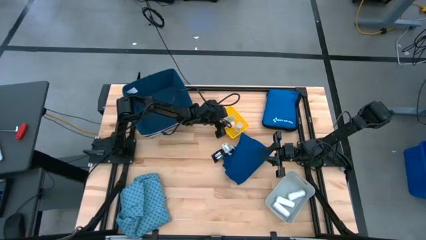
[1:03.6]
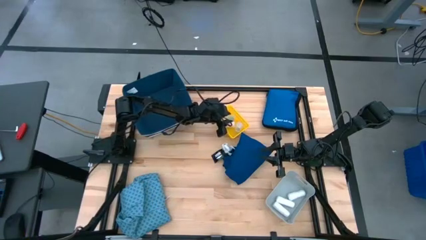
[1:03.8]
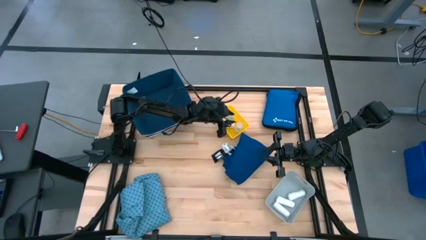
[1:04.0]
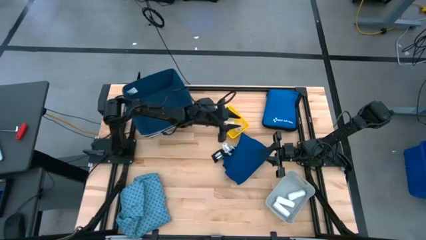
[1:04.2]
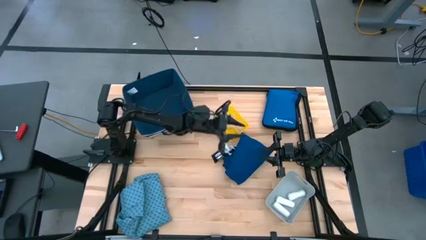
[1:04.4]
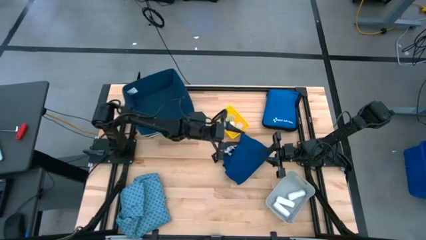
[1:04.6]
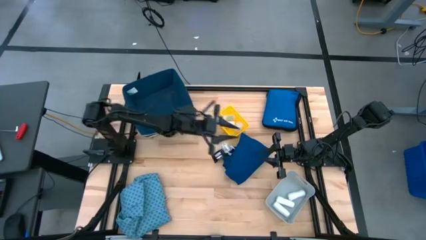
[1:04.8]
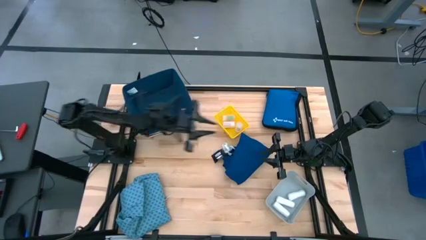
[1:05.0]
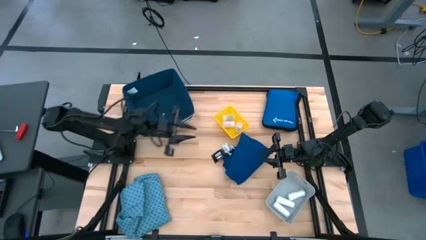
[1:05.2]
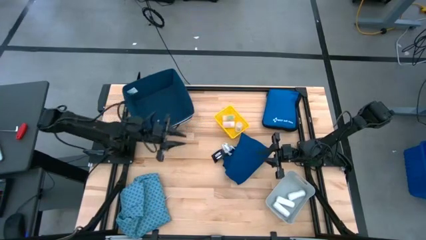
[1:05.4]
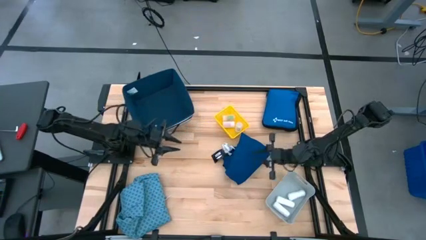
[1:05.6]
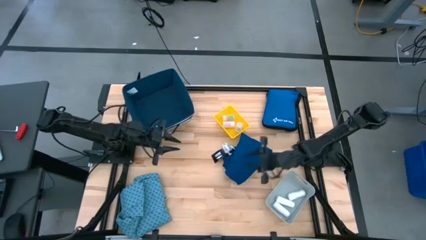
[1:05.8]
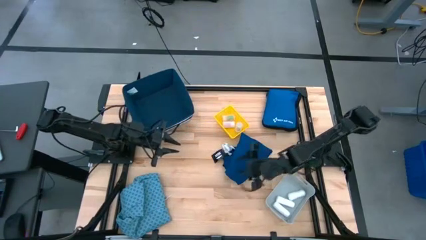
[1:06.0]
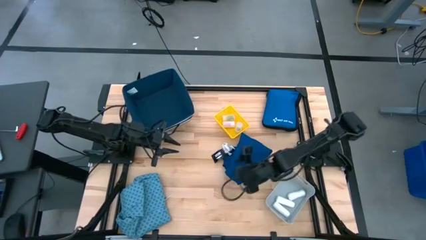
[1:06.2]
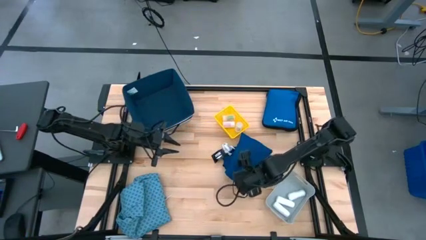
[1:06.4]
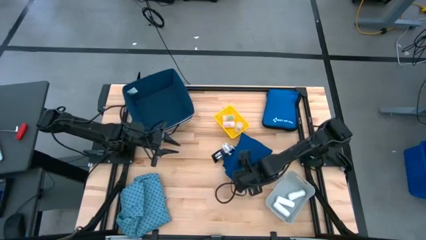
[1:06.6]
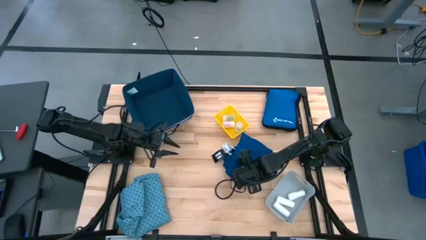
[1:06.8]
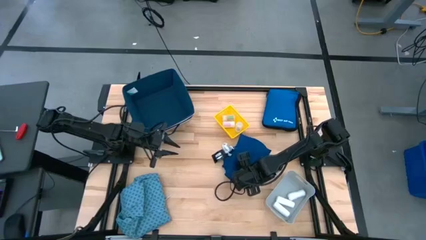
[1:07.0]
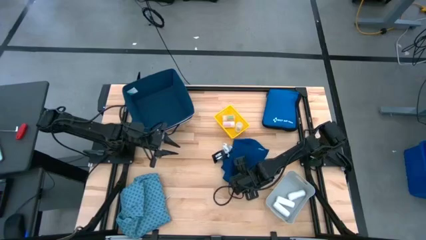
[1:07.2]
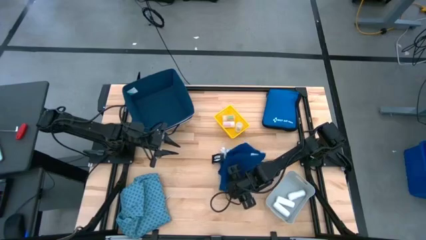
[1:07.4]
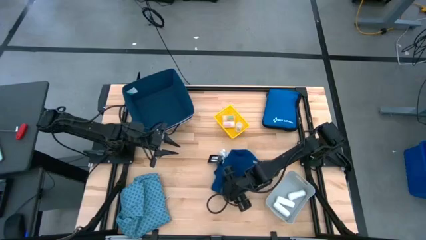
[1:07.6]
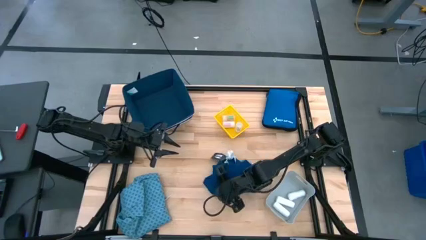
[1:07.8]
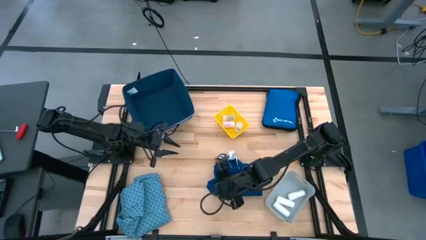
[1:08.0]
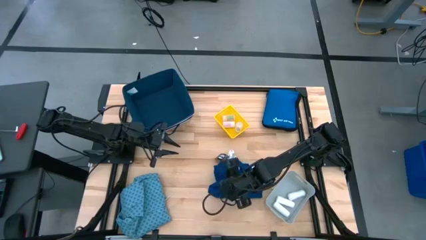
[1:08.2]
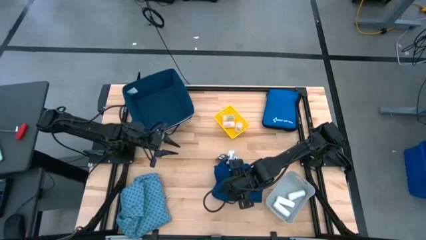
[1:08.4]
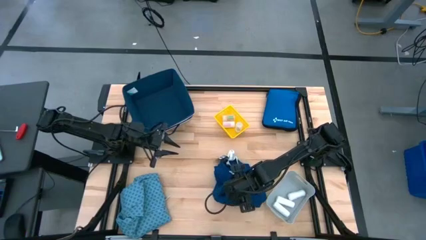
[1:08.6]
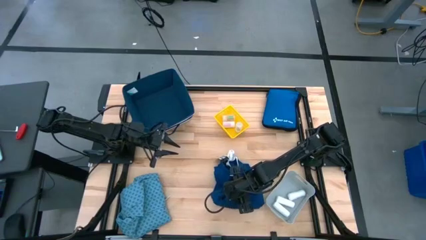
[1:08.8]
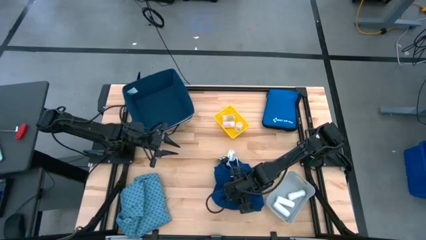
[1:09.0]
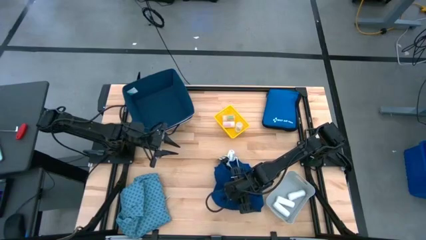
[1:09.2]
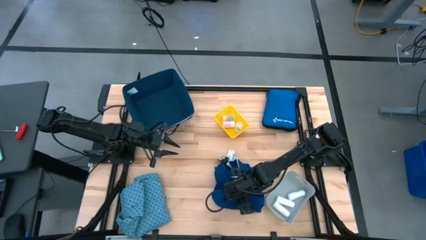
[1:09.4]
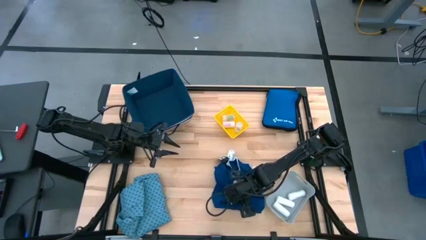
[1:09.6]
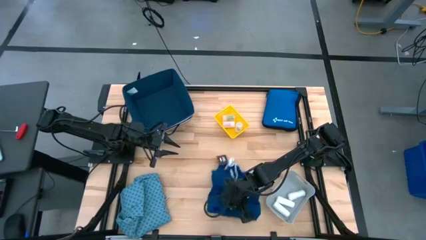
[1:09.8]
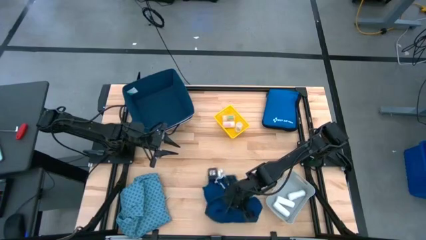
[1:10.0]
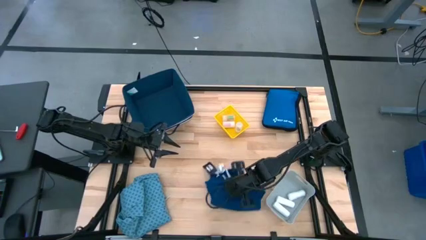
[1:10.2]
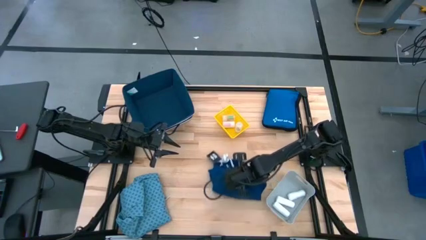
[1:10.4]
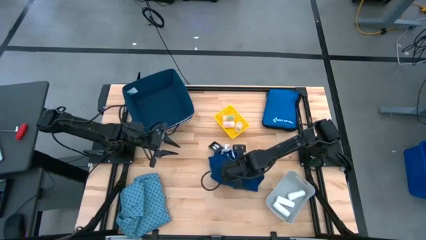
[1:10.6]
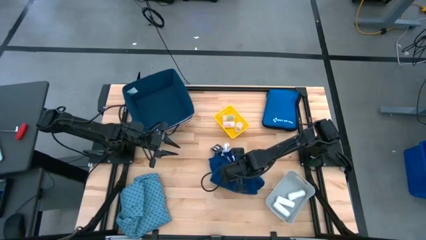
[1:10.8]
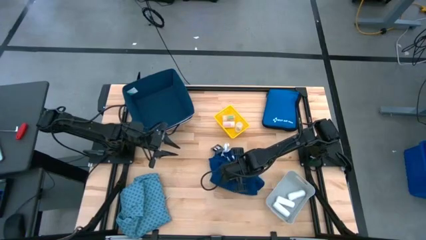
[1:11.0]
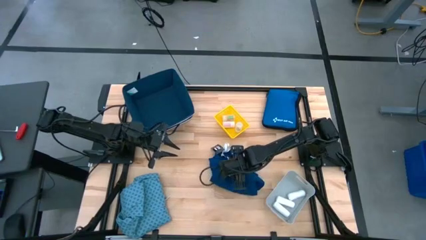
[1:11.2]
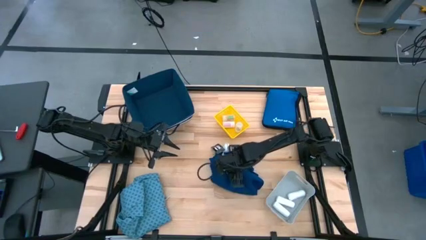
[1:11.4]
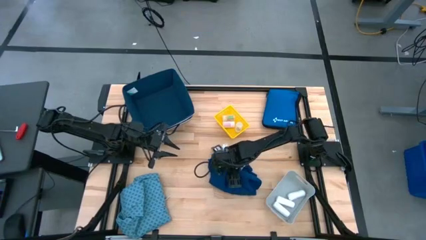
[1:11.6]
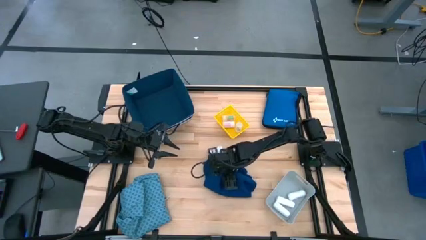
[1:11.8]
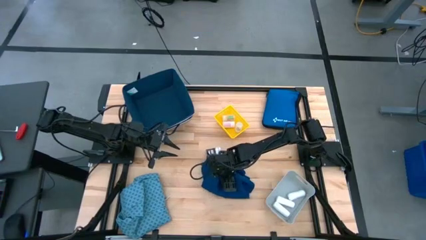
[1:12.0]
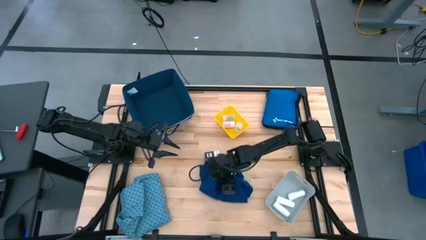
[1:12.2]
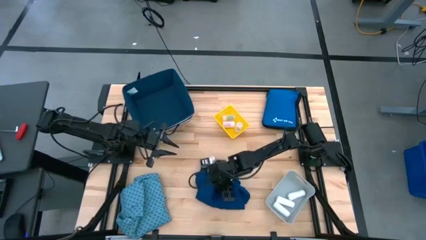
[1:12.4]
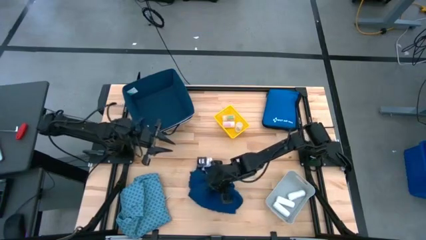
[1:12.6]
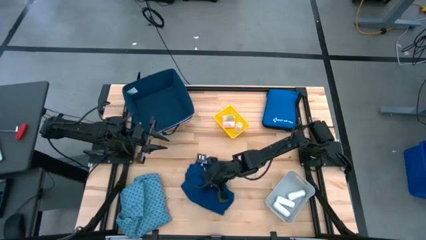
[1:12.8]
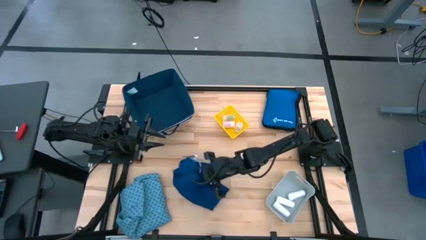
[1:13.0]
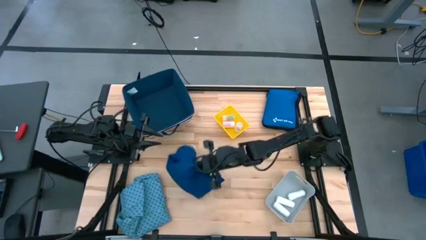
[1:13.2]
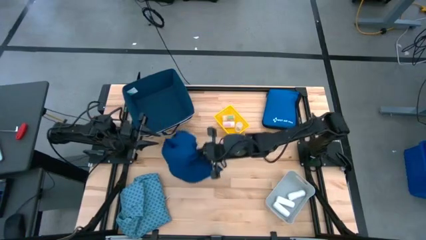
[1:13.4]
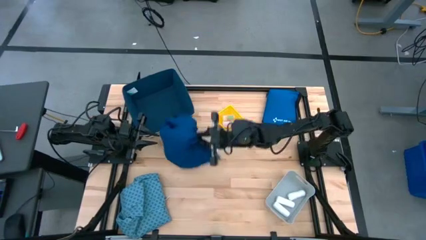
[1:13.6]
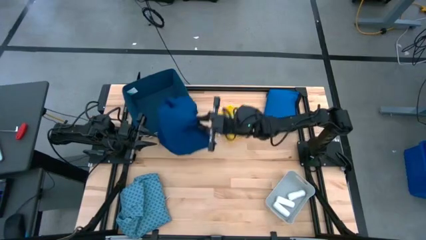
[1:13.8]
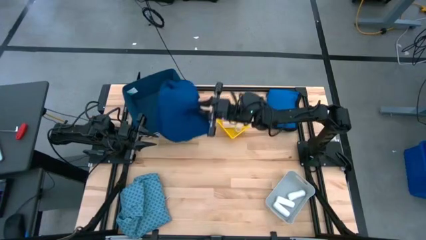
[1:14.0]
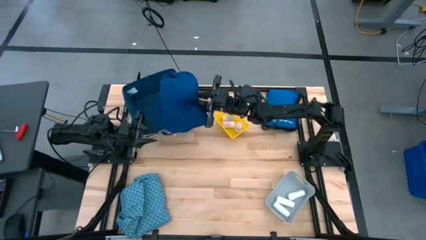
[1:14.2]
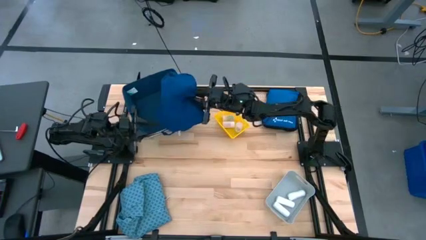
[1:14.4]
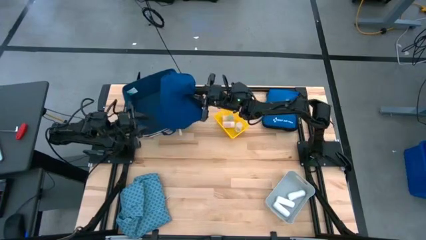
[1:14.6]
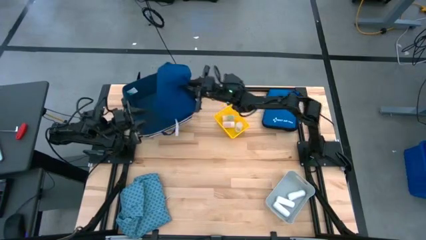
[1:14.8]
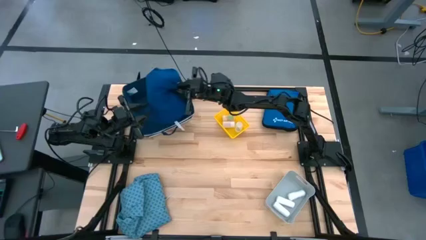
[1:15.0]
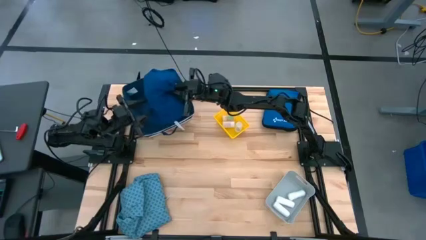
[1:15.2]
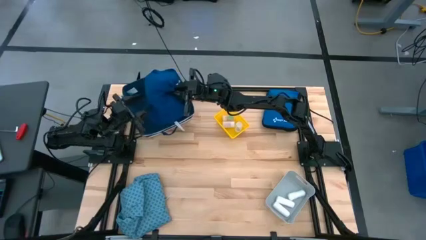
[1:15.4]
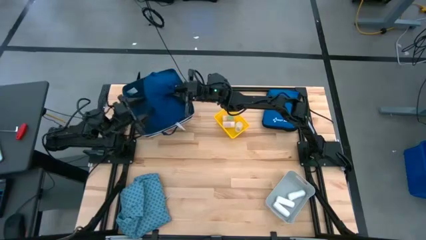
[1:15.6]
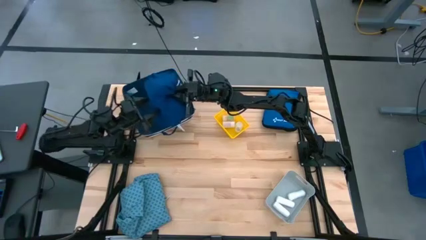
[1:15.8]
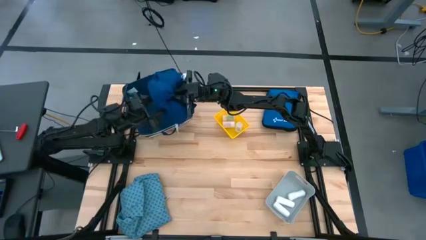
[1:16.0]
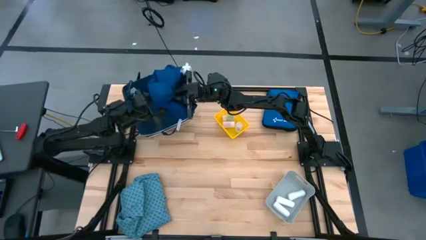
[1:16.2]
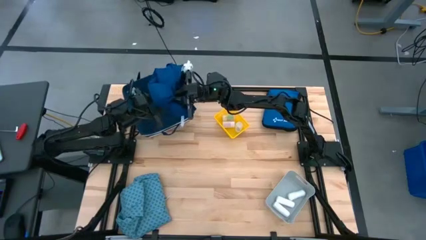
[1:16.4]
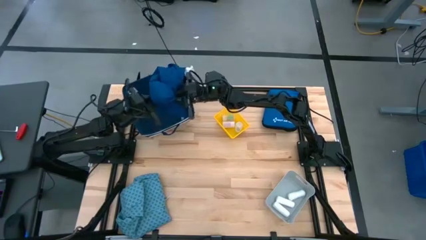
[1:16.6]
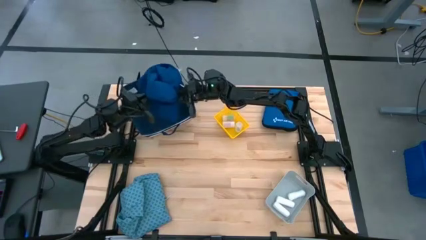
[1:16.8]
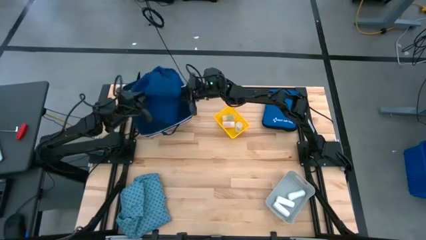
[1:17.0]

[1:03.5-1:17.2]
Task: Pick & place medical supplies in basket/bin
Put the dark blue patient gown into the blue bin

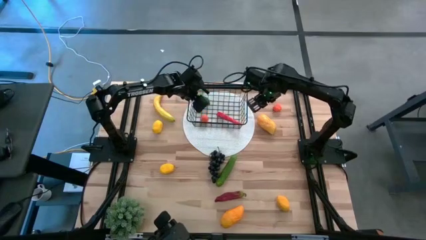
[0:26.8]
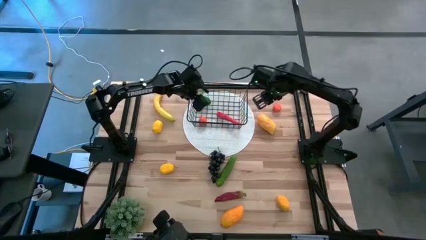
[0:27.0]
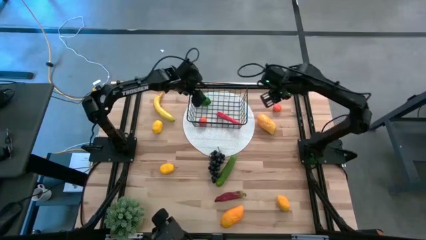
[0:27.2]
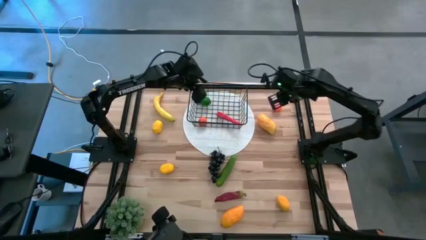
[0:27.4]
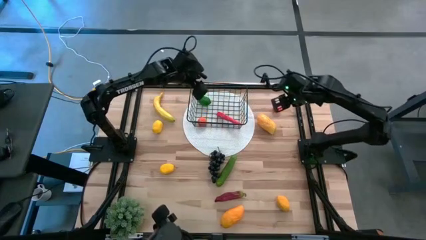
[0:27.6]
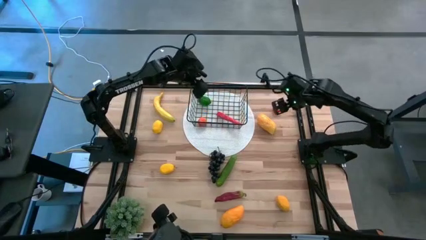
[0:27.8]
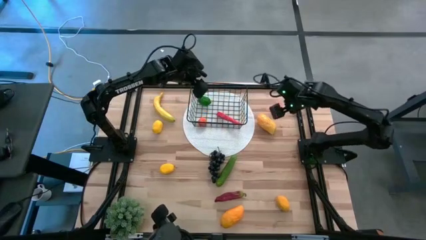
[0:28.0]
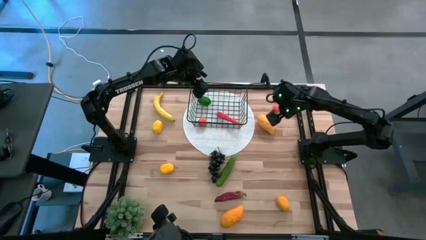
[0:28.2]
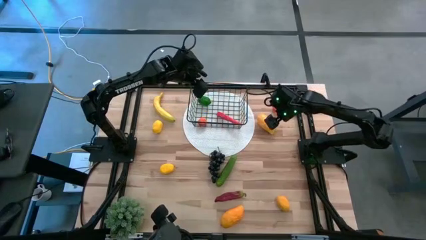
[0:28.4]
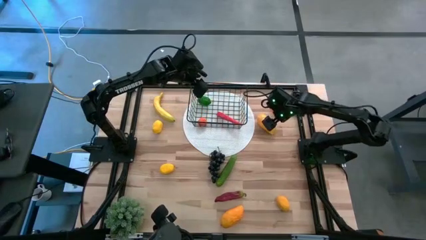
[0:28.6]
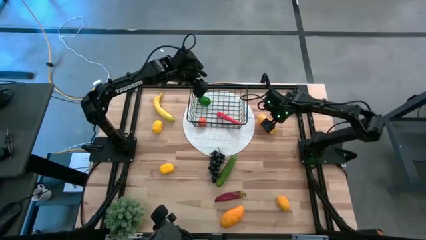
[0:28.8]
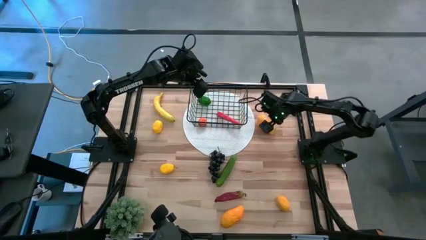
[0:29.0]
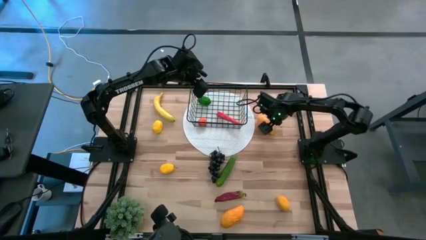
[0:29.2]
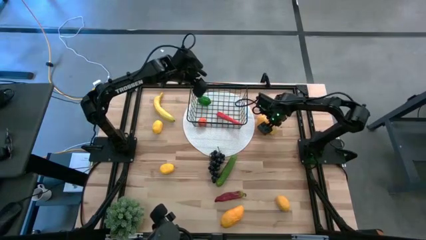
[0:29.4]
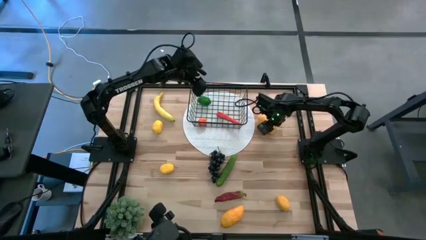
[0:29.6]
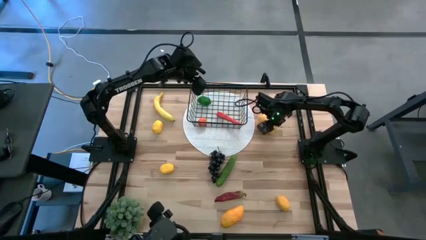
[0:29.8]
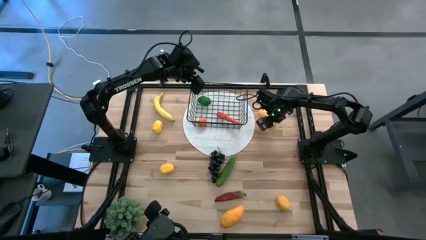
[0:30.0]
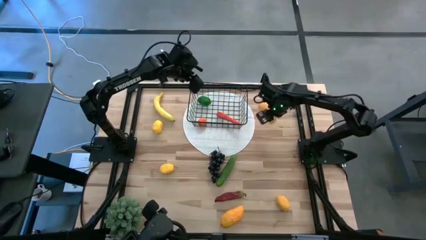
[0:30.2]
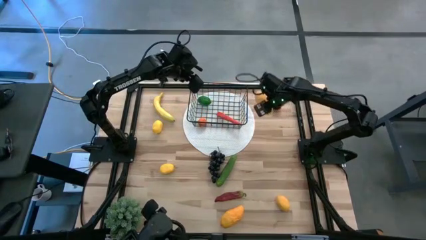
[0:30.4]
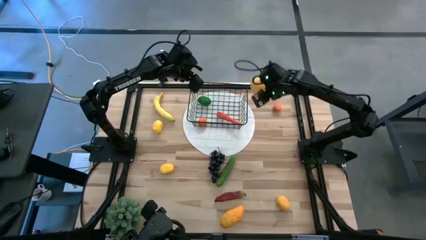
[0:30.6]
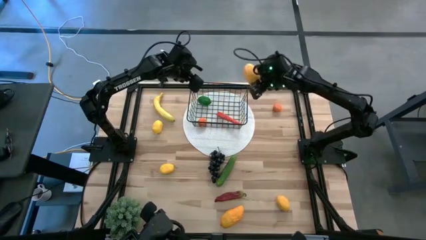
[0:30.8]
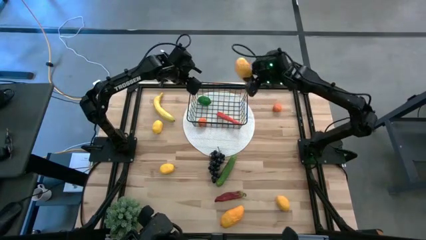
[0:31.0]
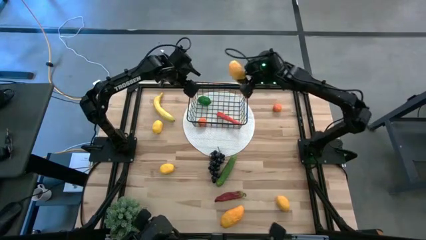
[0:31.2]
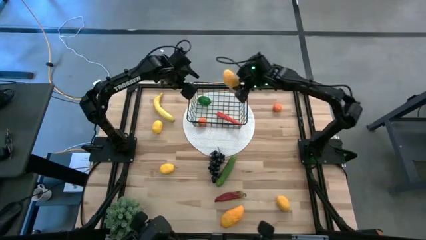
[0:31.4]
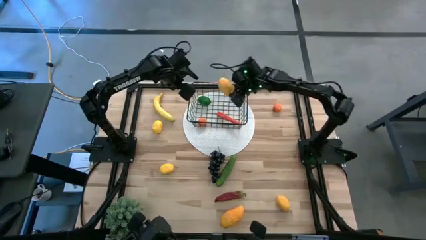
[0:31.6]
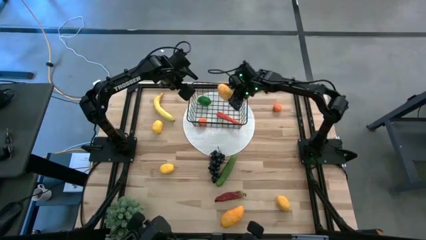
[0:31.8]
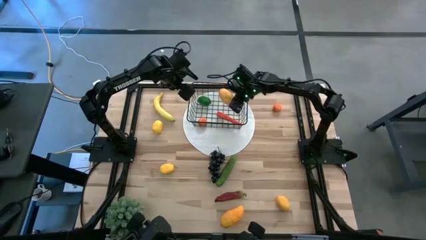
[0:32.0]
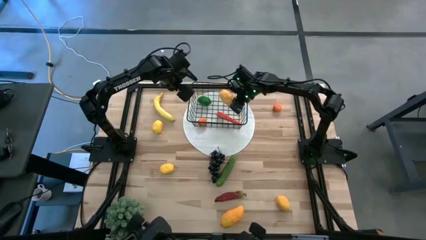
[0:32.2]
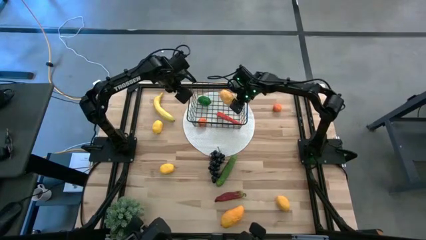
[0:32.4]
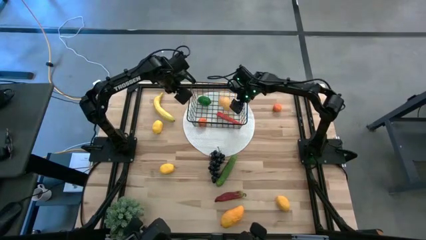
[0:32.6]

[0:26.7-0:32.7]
Task: Build produce basket
Put the top yellow mango into the black wire basket
